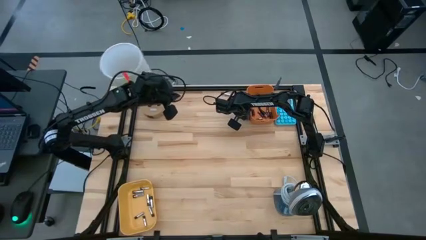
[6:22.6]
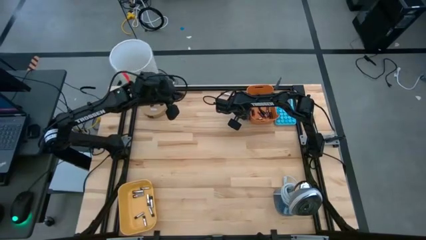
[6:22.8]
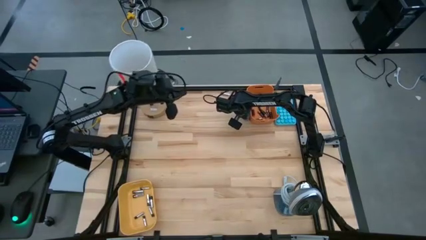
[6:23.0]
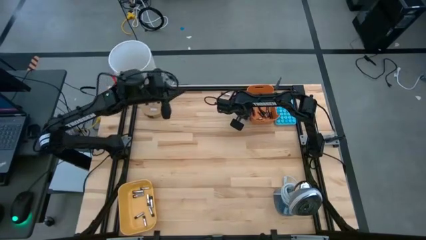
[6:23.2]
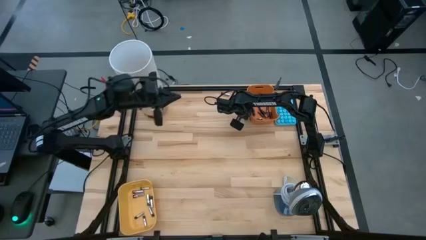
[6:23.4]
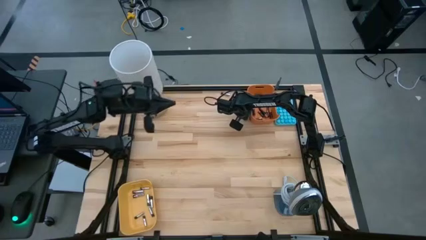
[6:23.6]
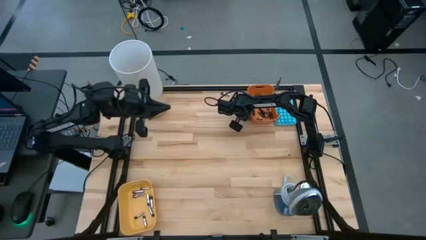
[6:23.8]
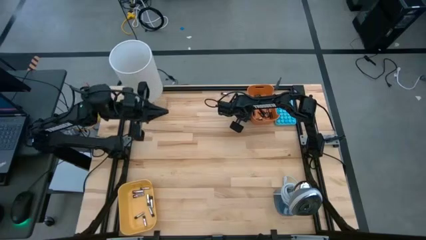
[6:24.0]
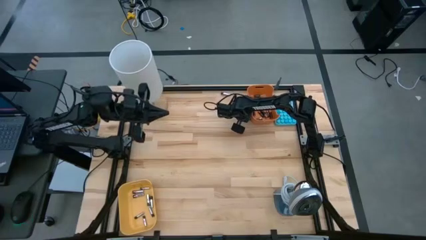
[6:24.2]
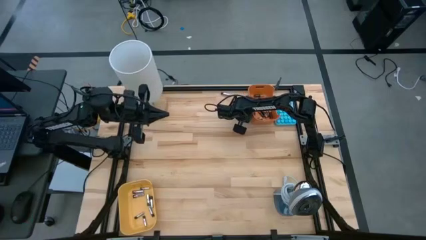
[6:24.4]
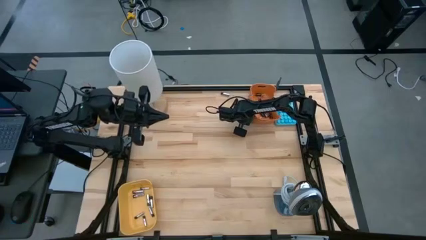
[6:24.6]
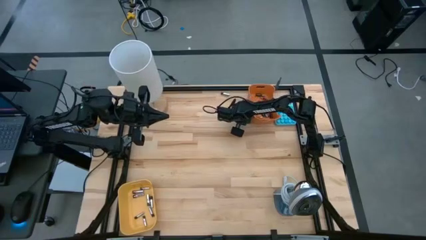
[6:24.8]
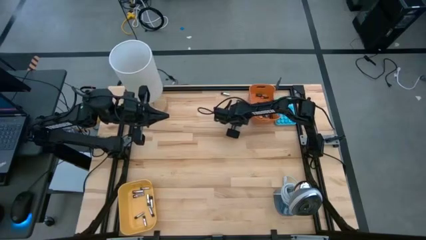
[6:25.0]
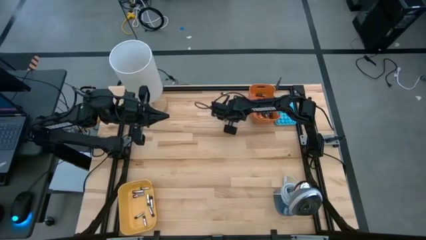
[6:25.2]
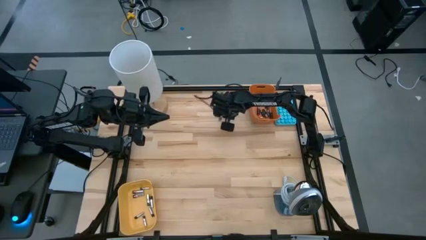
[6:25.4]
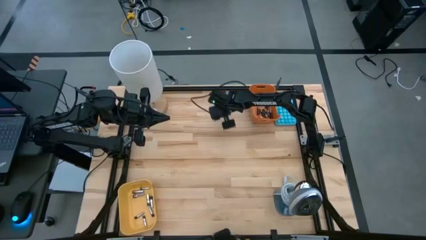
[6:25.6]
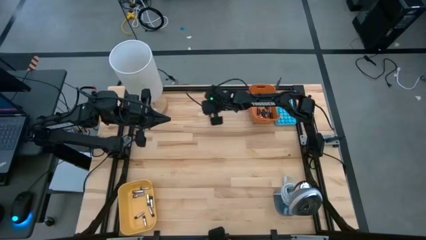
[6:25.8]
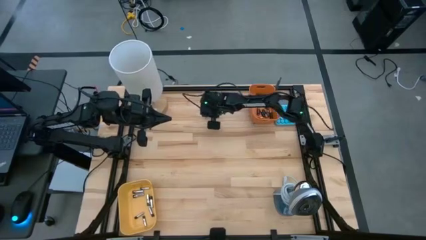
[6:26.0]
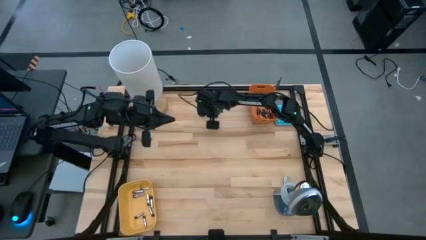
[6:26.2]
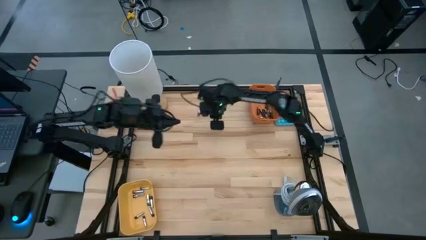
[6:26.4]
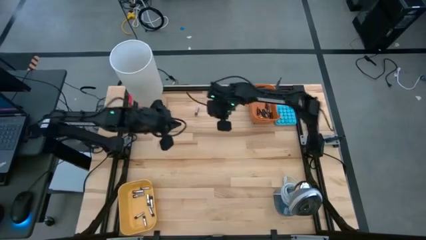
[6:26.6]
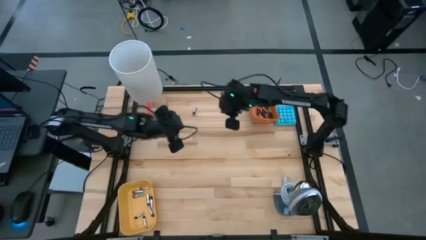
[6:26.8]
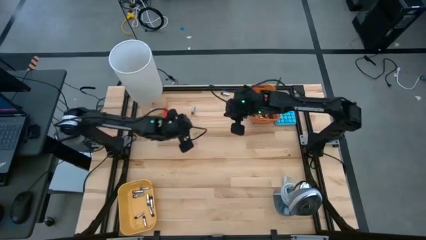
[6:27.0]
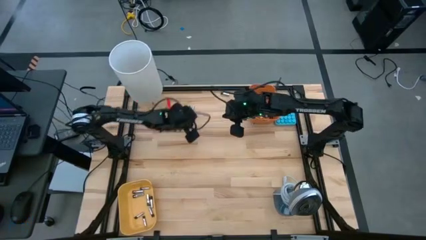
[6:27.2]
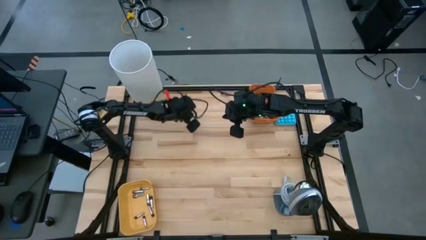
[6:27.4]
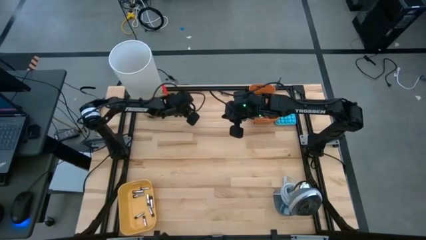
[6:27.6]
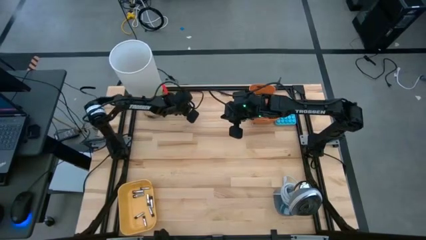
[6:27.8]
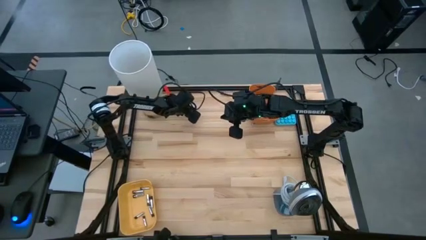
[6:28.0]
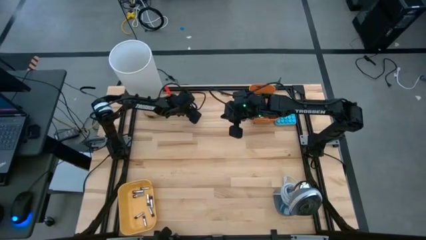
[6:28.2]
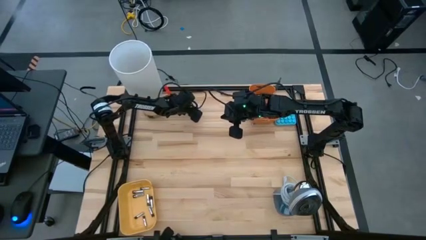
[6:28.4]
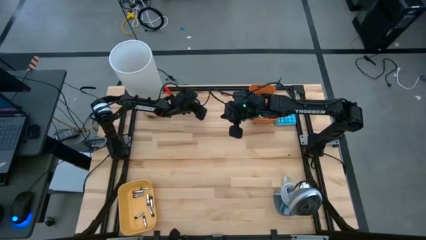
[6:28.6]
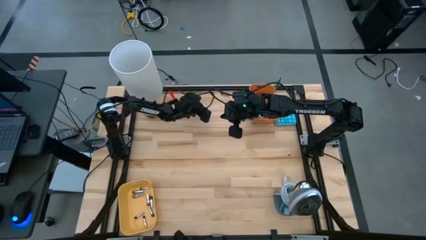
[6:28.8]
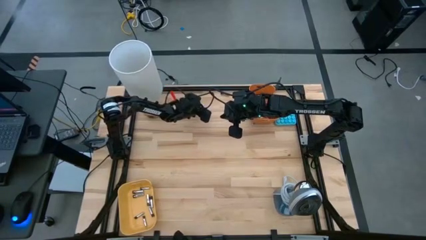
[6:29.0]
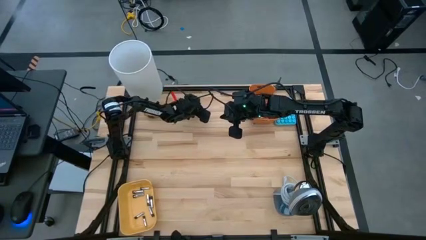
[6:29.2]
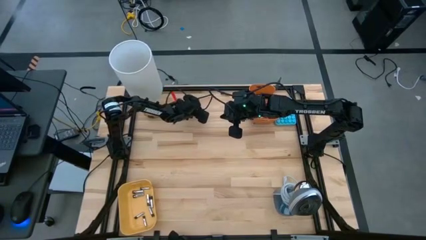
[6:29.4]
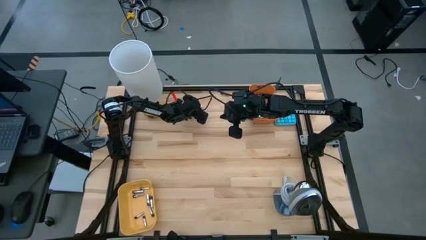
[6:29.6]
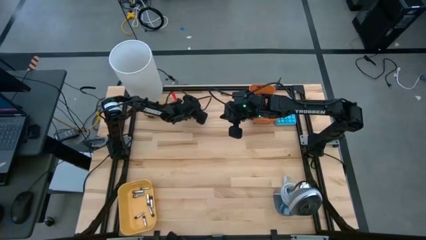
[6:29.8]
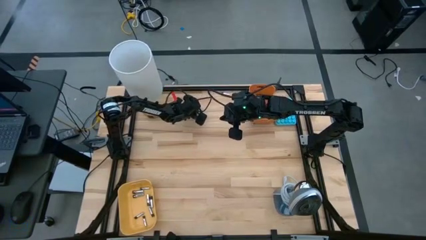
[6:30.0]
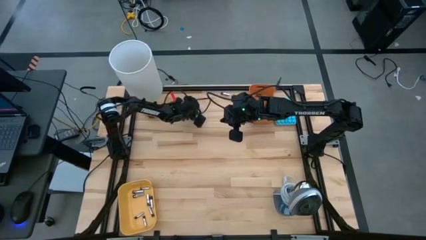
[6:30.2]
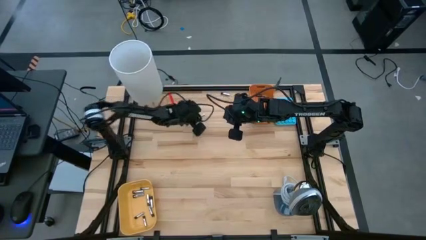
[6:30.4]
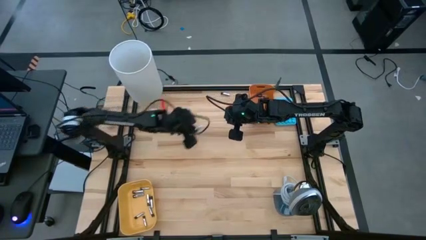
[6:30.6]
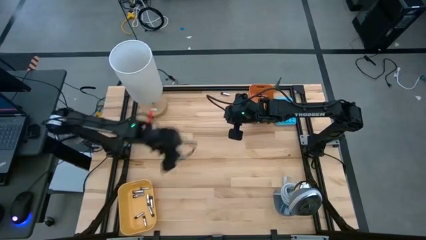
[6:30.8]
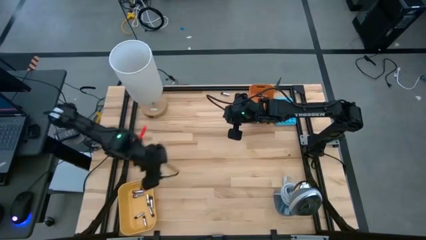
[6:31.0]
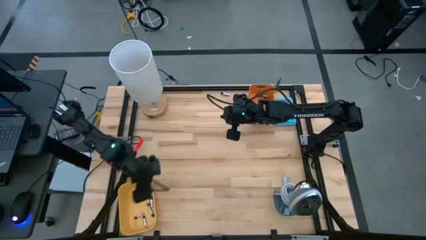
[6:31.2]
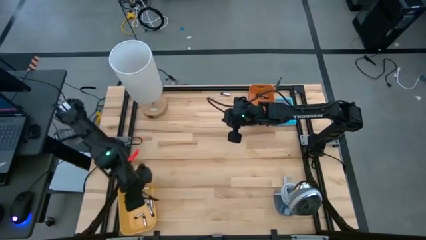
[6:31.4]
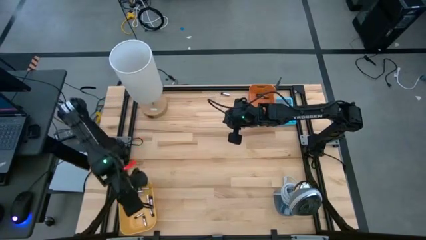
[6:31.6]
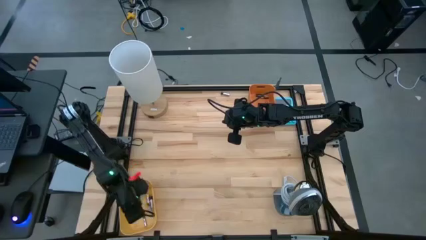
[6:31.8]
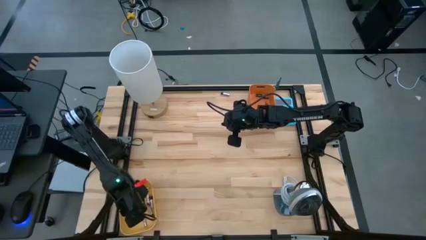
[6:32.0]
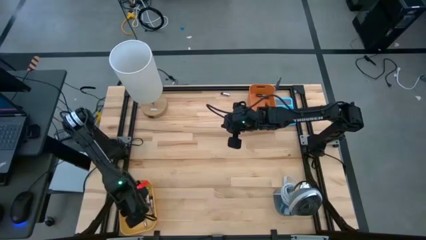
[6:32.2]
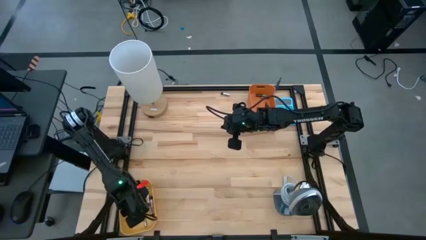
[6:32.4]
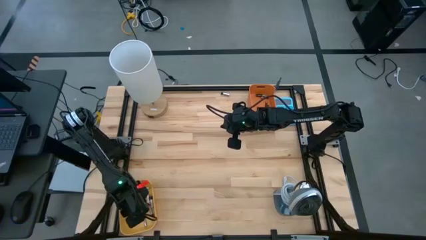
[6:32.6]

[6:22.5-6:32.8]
Task: Sort batteries
Put the silver battery into the yellow bin
